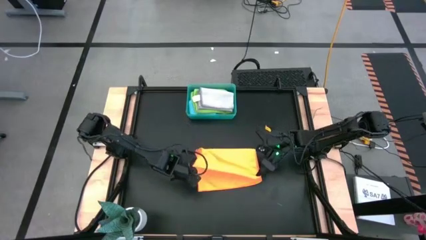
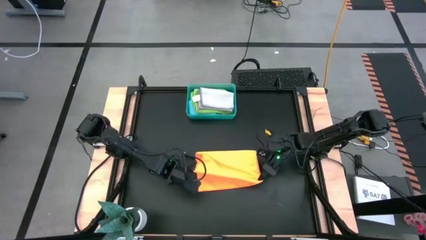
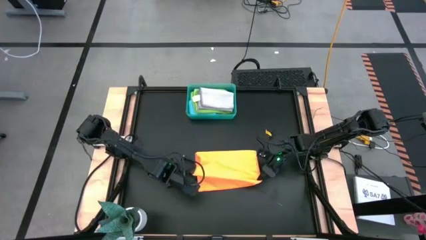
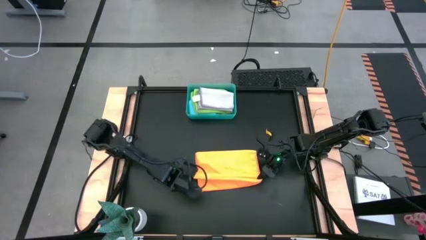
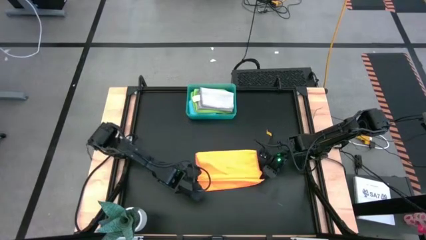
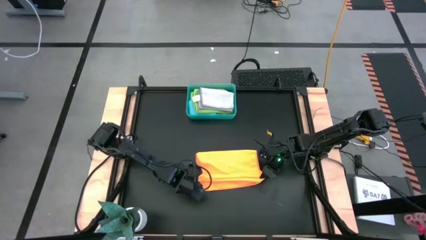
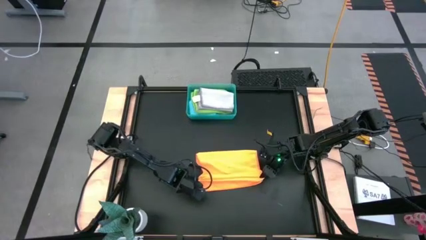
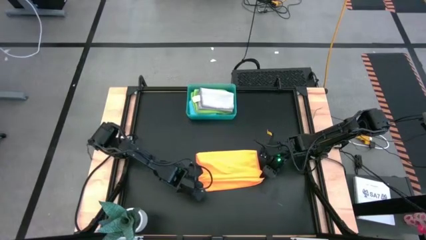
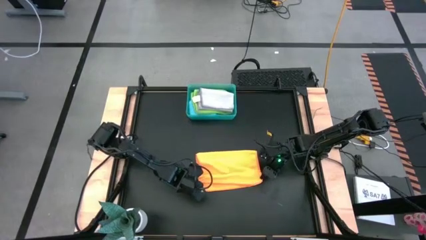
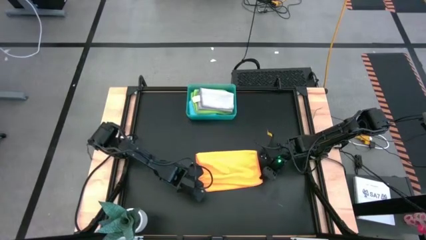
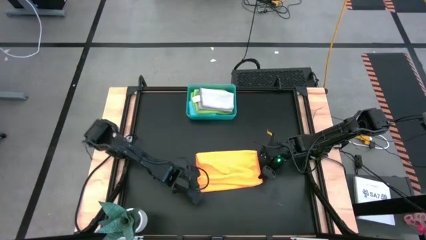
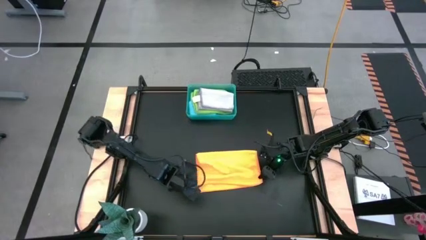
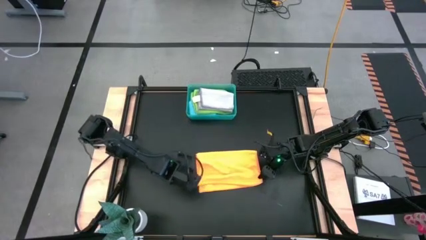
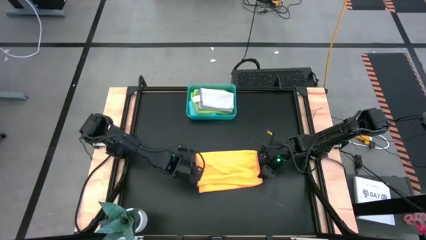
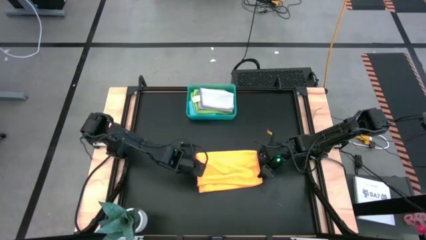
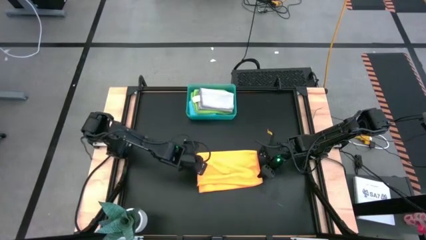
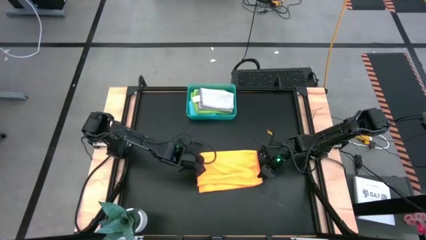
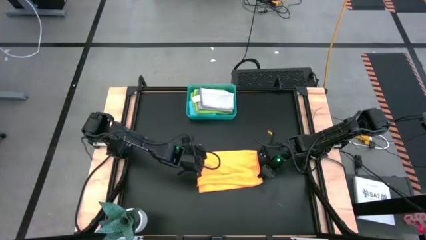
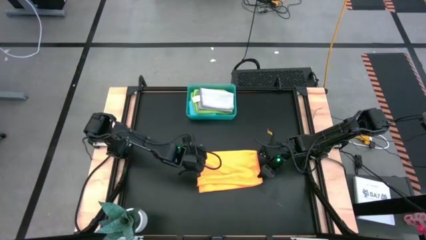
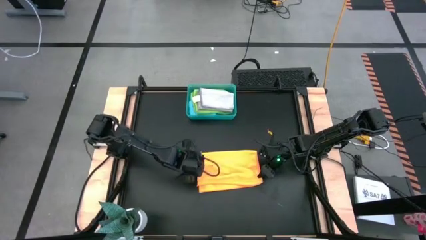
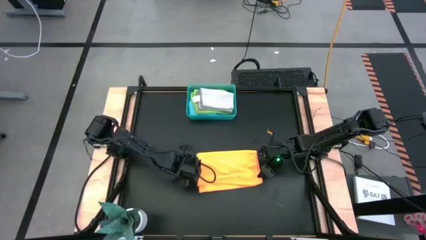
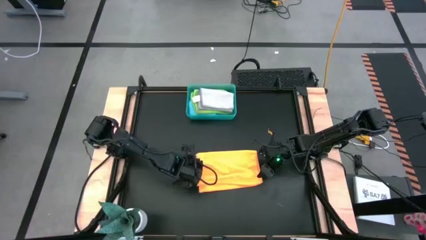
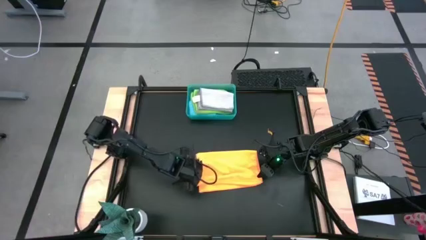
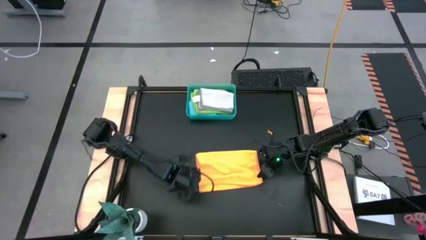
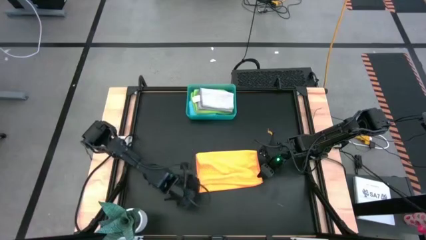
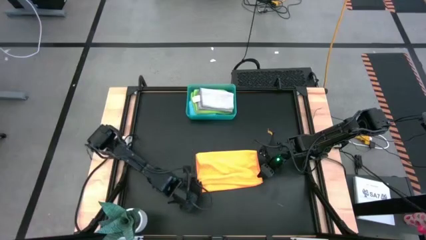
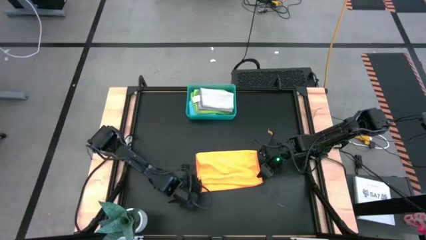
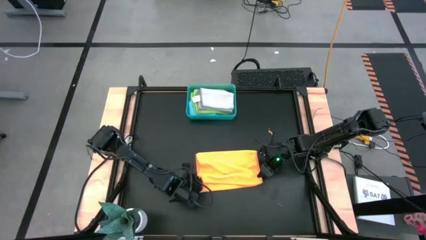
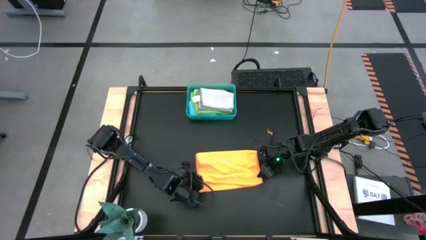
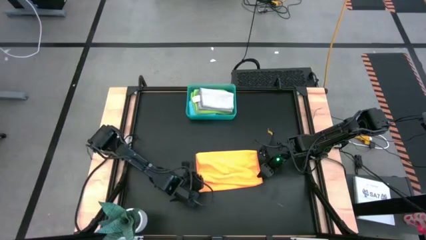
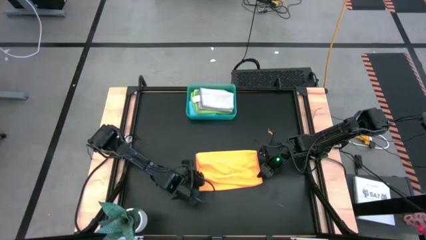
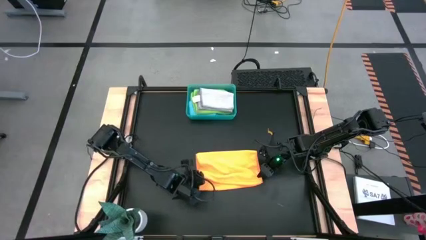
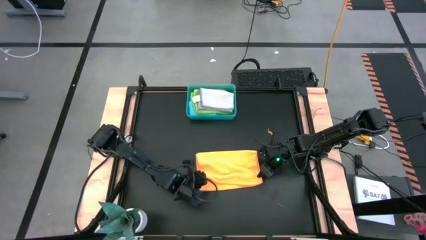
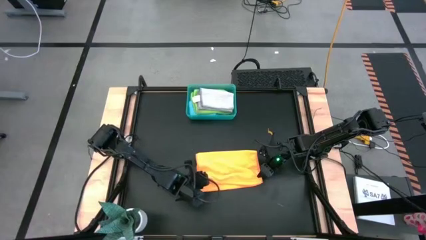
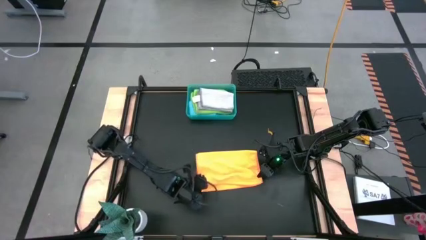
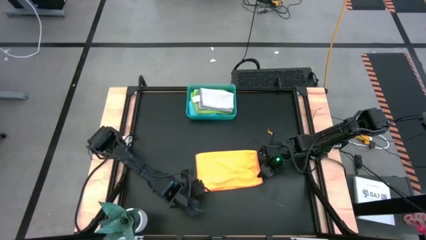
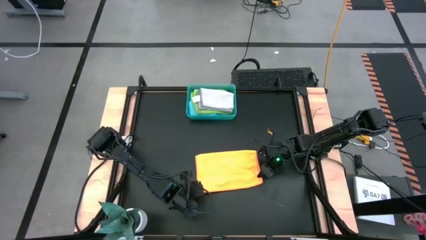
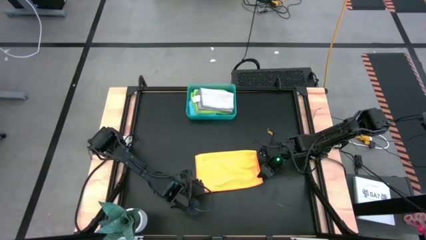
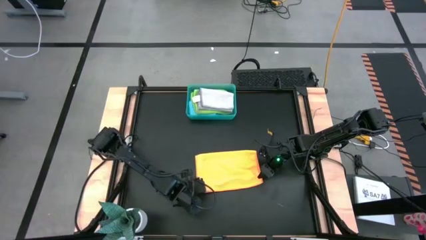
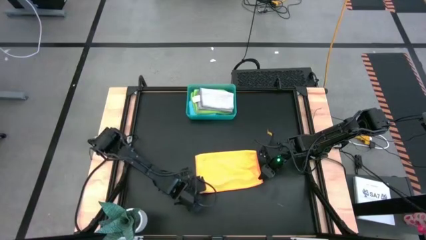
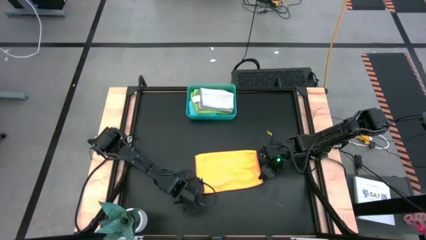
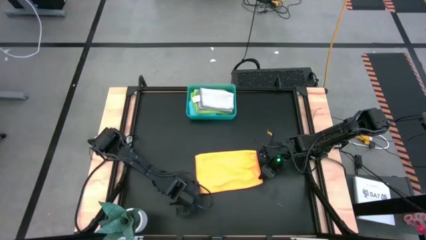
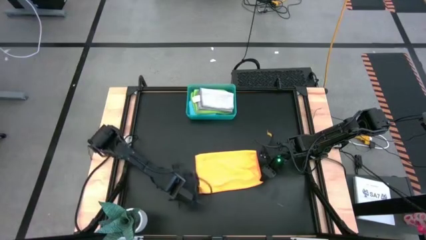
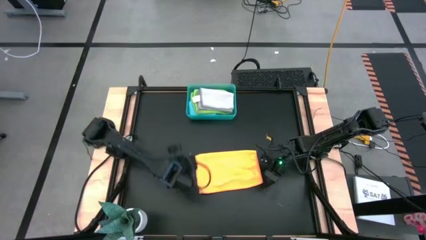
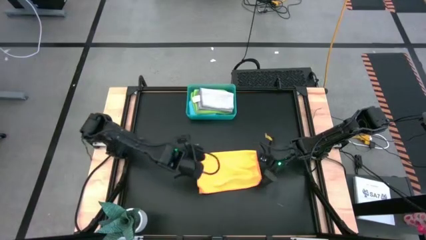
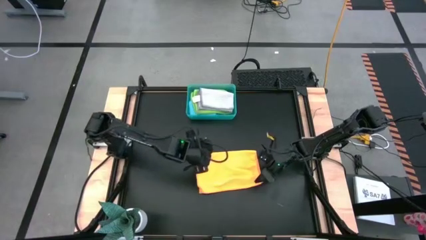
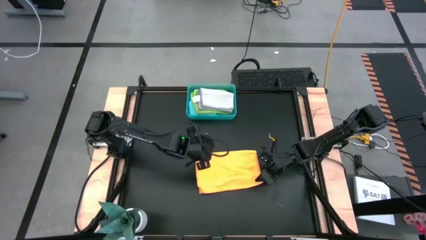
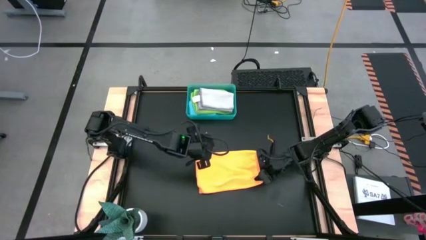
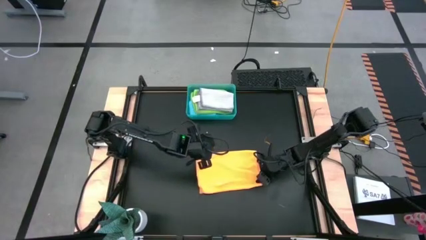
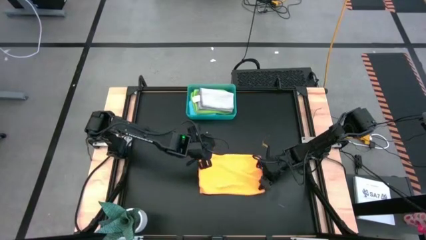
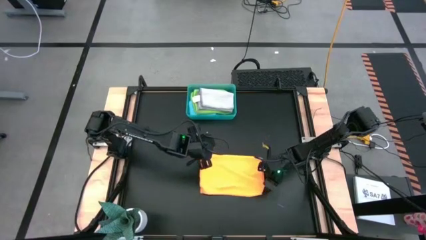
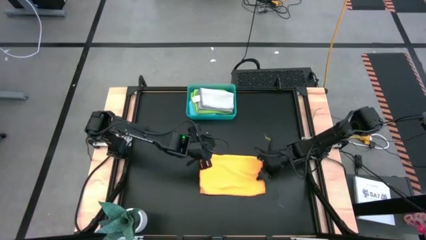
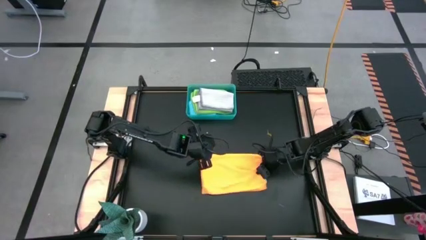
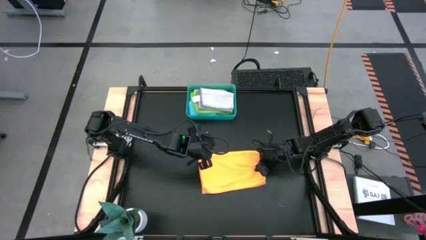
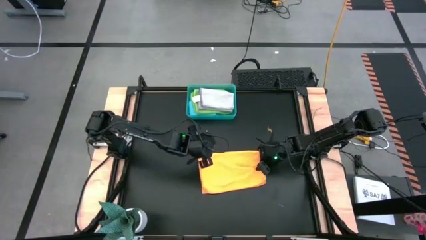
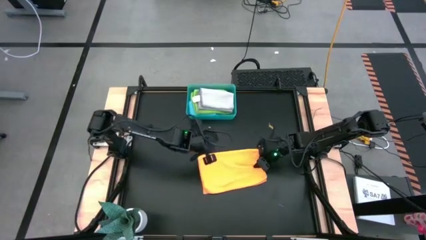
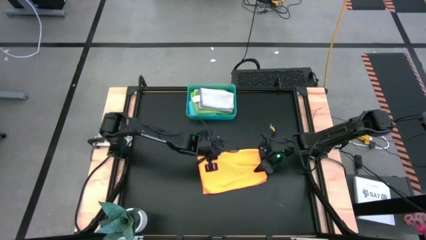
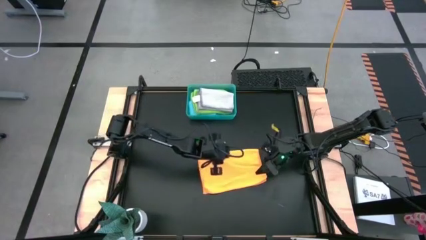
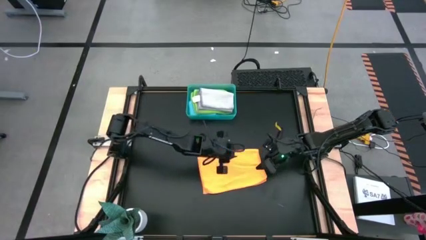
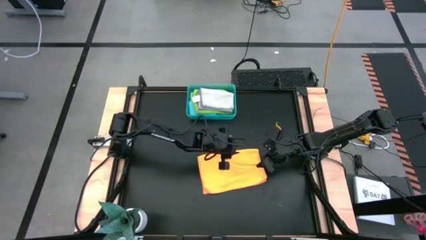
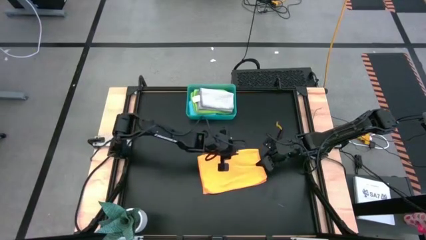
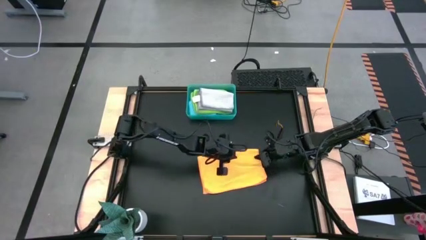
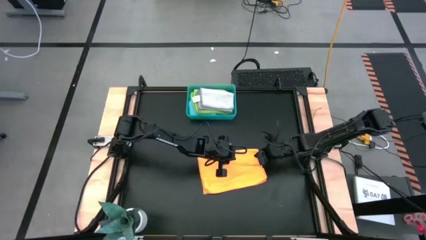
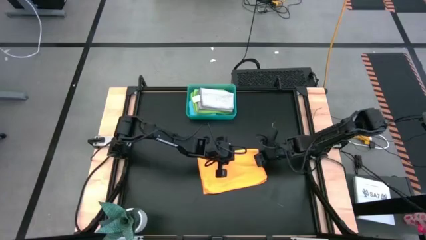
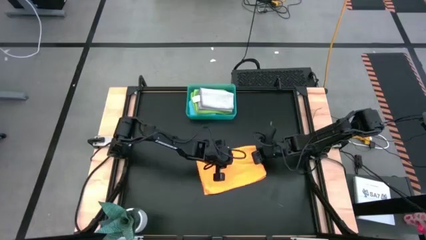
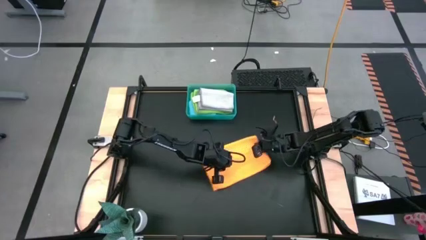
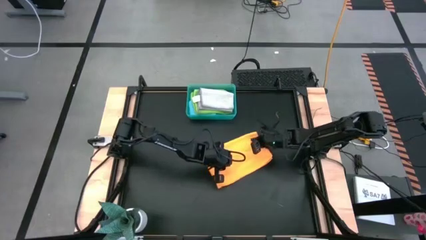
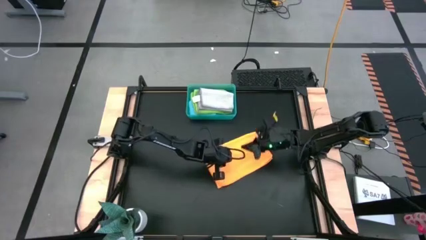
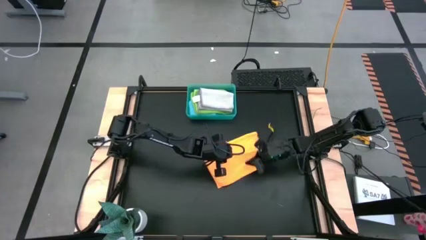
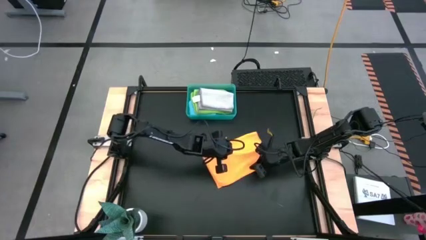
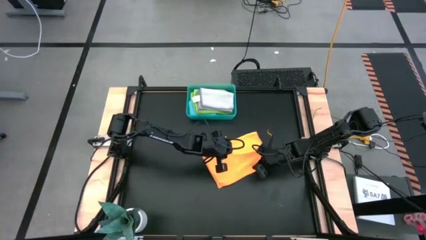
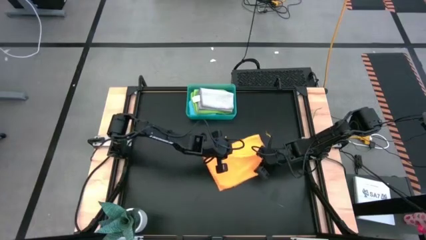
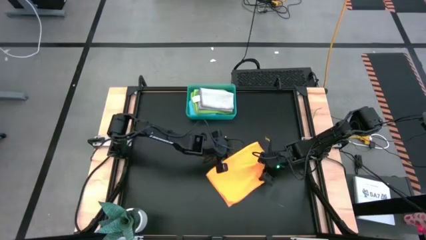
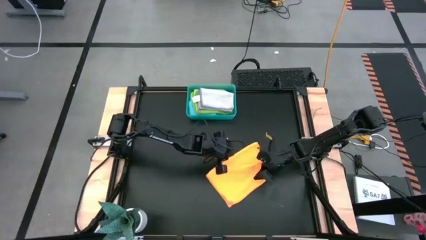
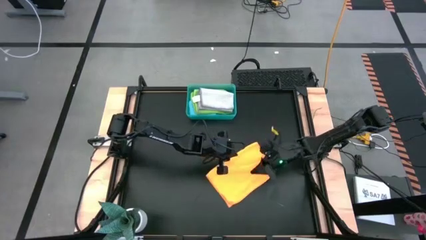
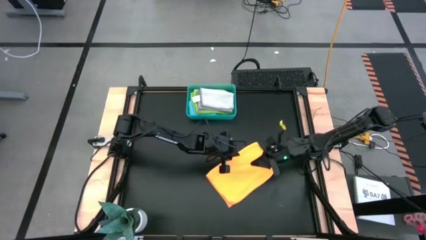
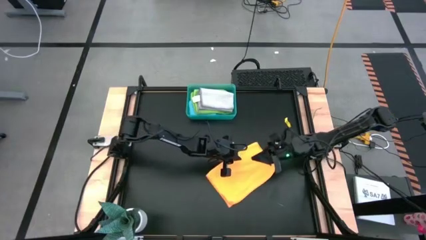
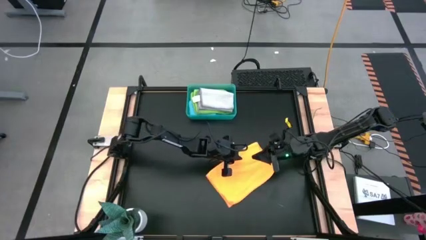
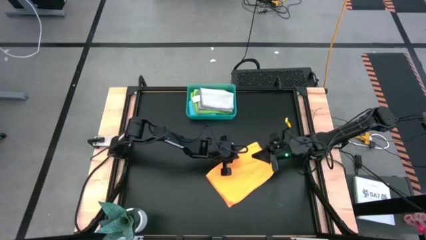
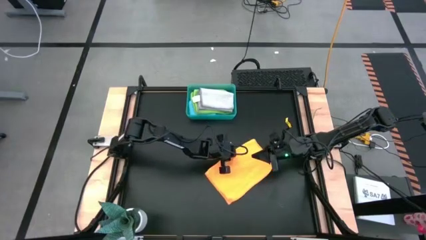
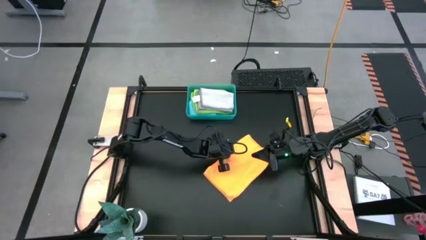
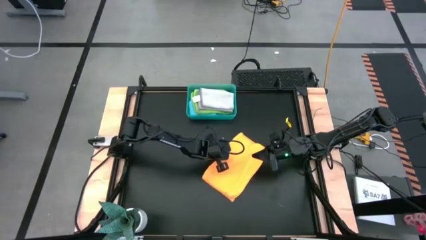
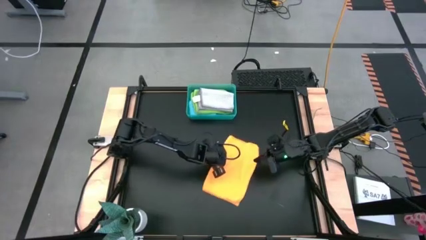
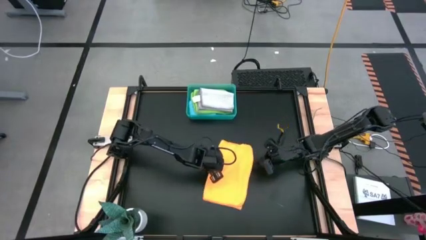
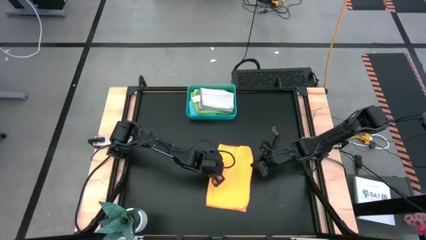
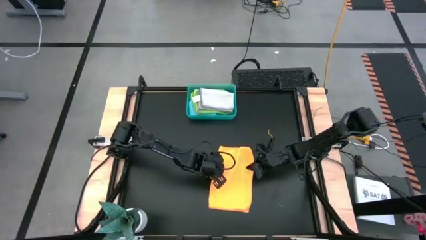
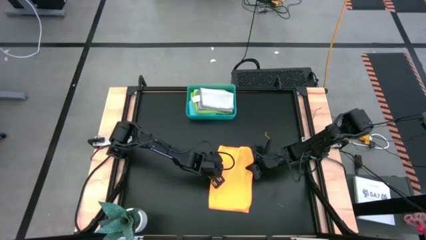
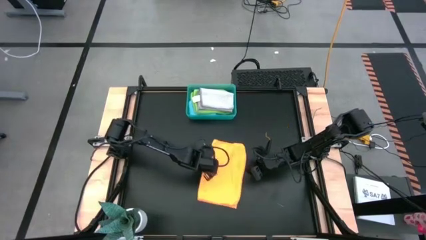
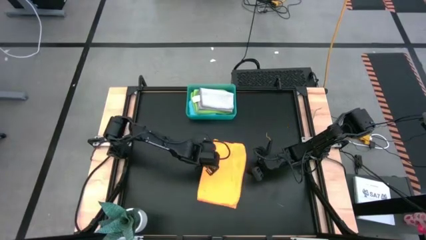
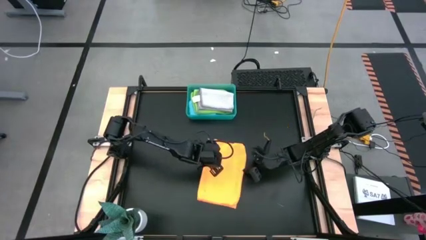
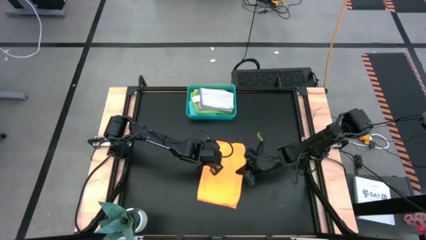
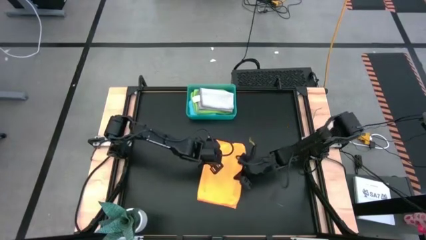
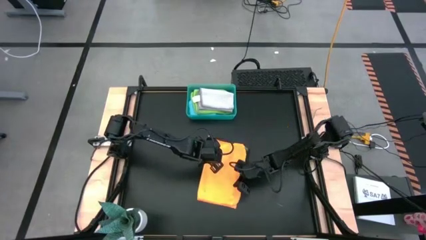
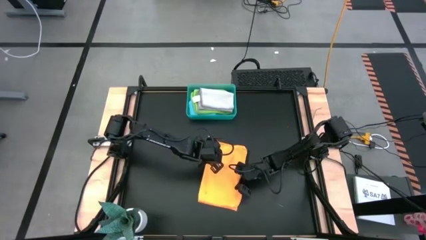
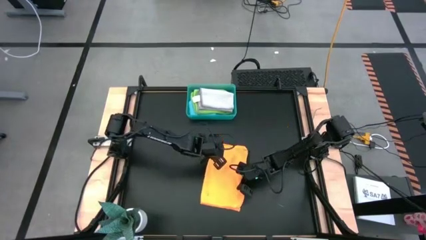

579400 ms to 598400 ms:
Task: Fold microfiber towels
Fold the orange microfiber towel
